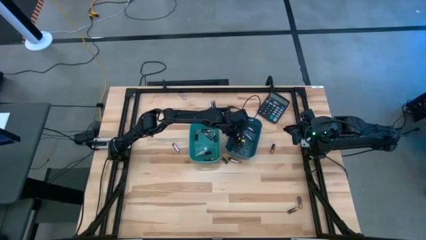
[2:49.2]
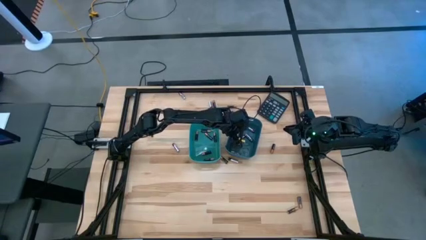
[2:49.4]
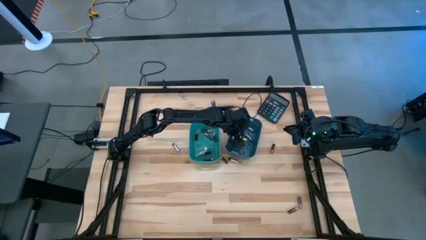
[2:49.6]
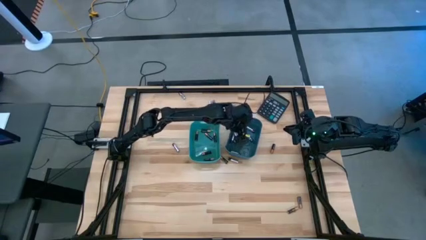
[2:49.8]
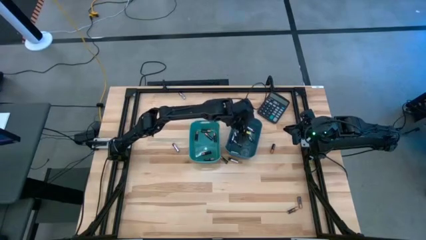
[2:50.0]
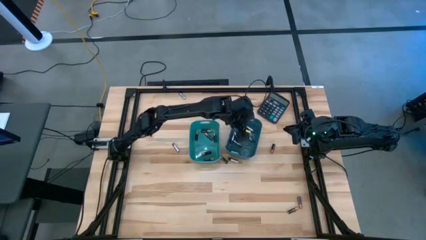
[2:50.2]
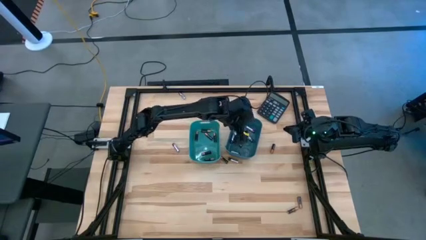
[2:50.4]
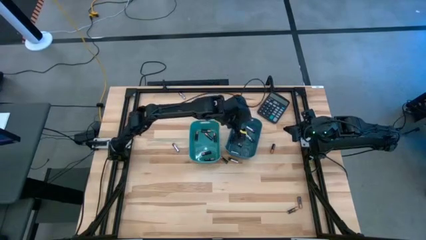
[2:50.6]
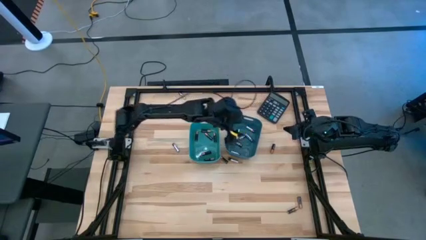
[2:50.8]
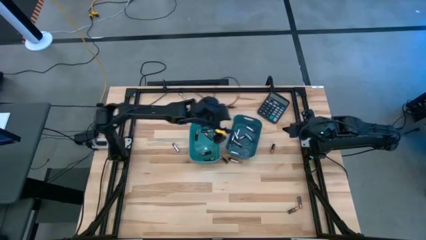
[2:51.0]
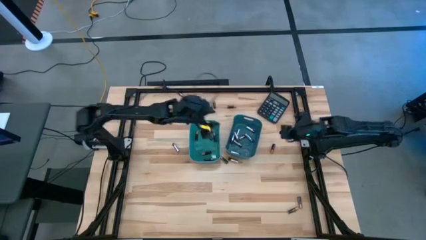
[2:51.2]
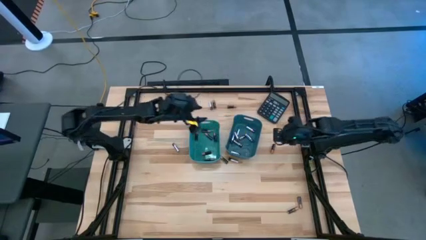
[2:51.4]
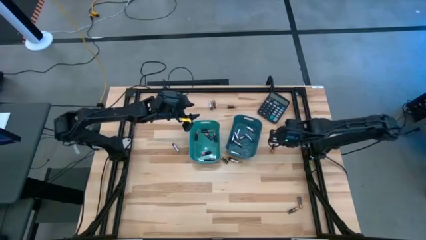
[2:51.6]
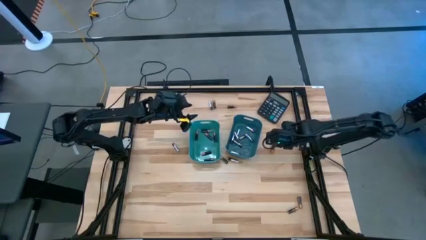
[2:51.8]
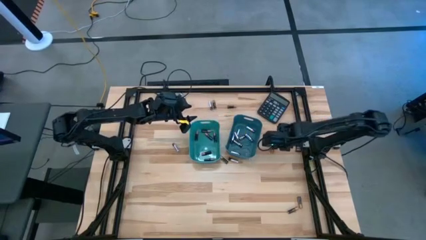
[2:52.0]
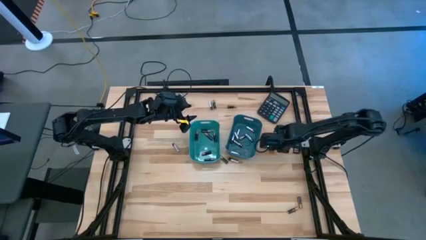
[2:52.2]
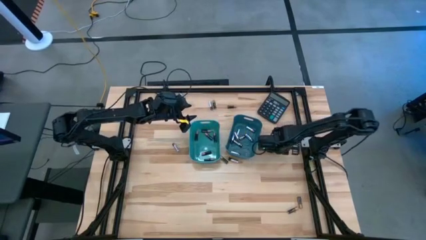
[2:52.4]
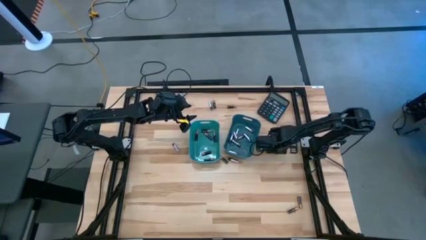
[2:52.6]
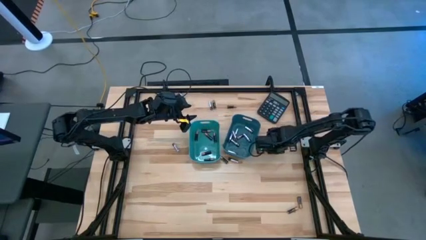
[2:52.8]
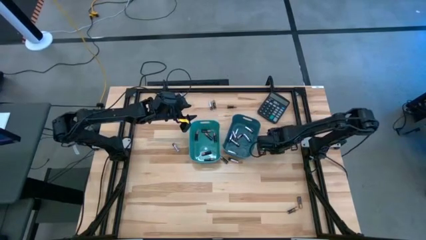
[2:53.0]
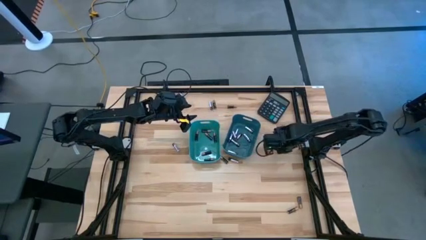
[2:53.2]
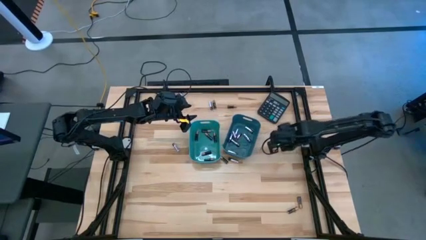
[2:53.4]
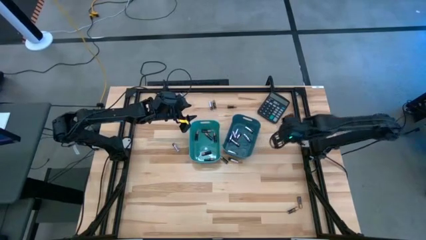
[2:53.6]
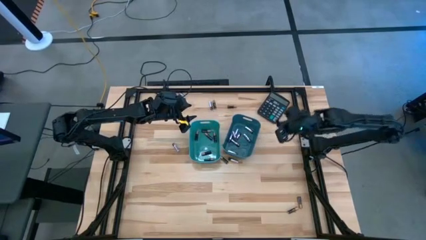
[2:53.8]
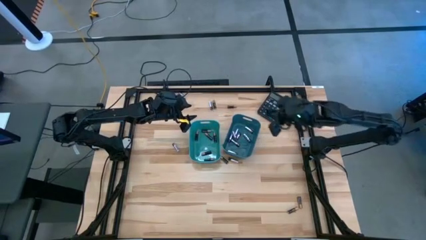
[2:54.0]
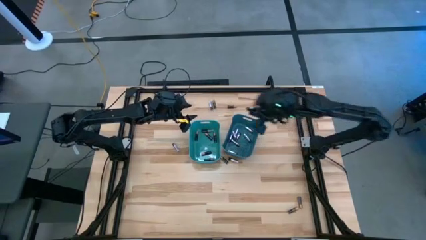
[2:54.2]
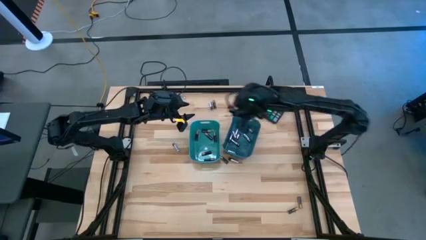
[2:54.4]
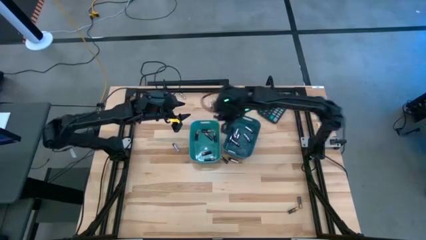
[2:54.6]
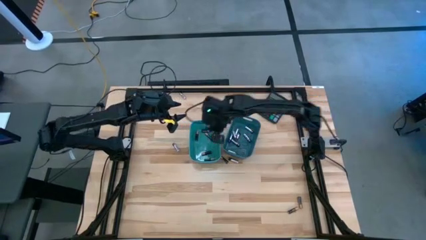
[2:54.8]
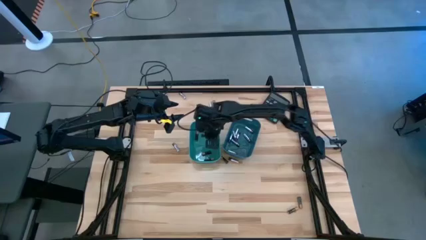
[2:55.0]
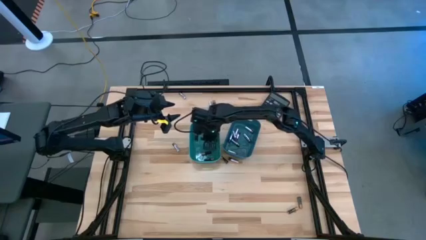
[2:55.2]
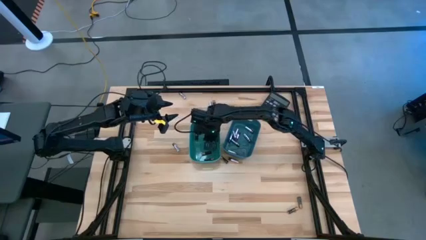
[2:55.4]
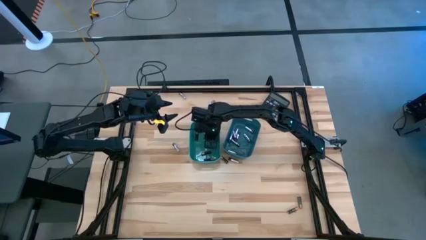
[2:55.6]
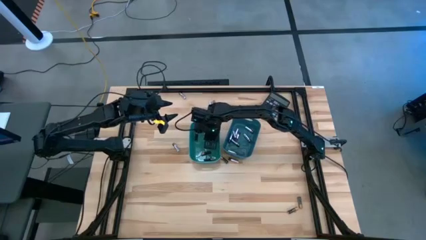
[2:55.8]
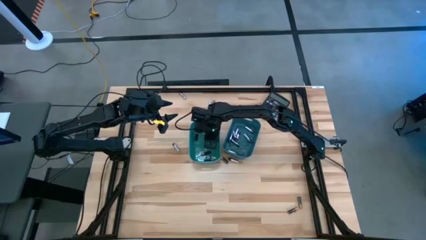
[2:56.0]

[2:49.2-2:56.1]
Task: Sort batteries
Put the black battery into the green bin

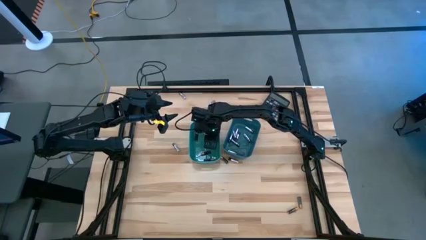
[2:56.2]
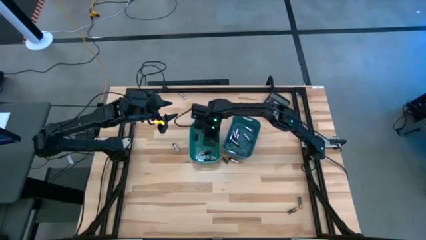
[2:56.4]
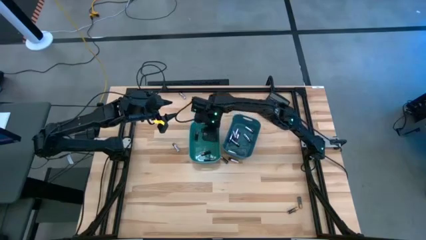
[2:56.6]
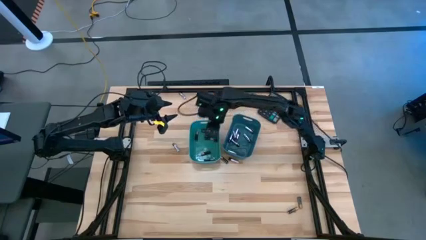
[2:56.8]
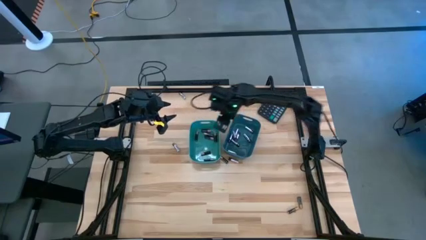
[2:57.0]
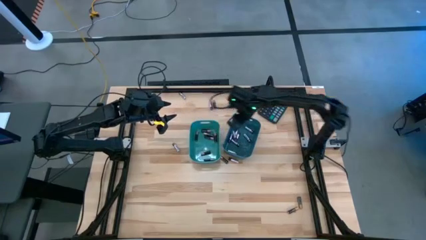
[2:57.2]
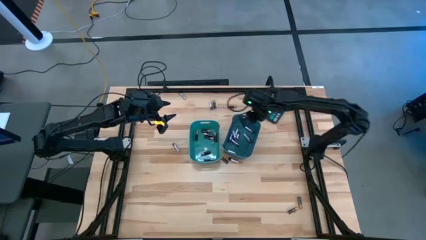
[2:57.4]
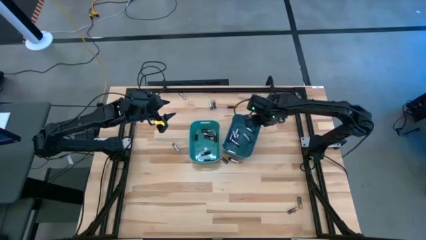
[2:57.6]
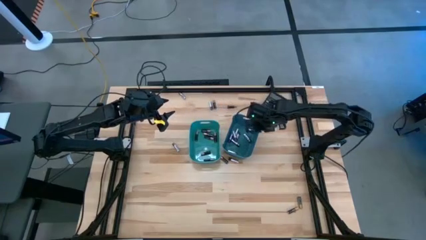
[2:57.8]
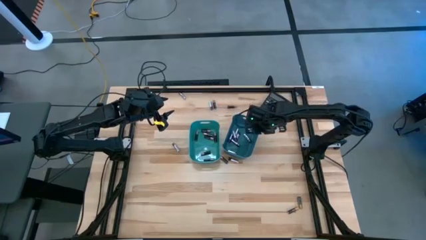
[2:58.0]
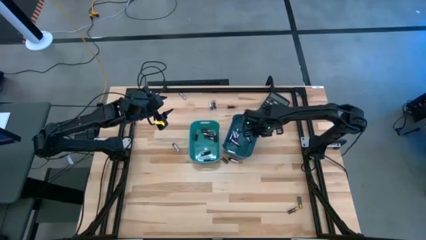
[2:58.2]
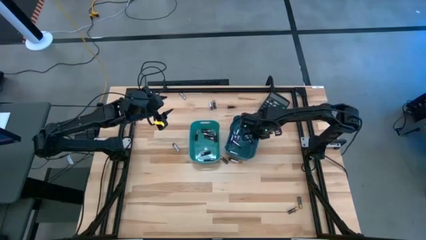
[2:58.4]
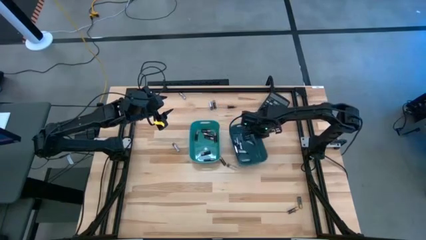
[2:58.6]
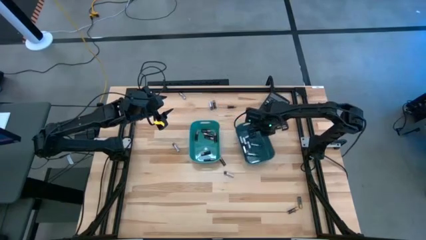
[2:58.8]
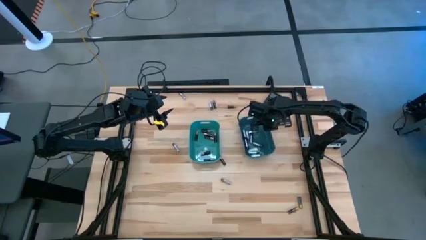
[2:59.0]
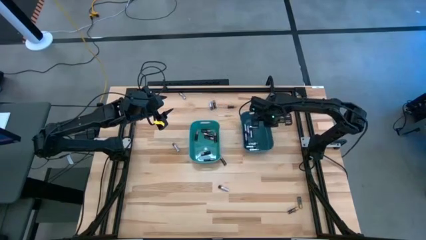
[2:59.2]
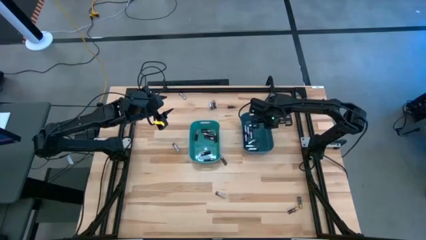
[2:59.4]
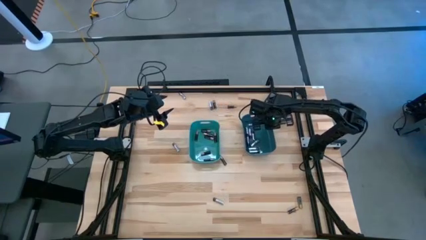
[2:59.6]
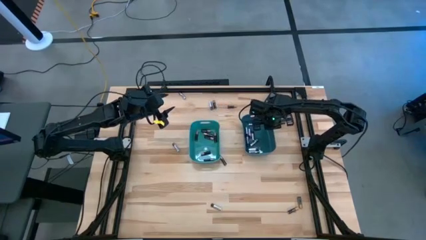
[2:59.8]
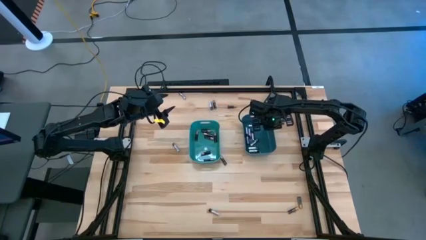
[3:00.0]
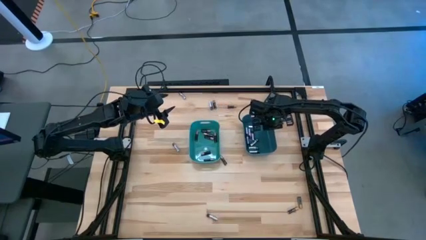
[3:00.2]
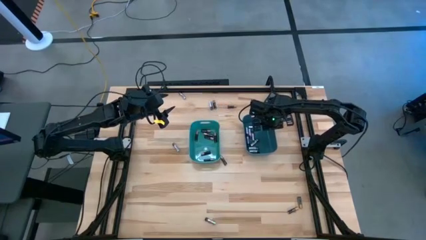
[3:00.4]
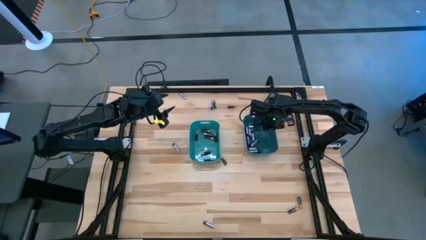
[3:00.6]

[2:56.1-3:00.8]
Adjust the blue bin on the table

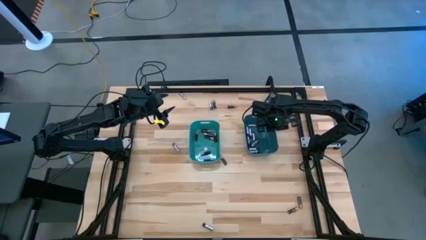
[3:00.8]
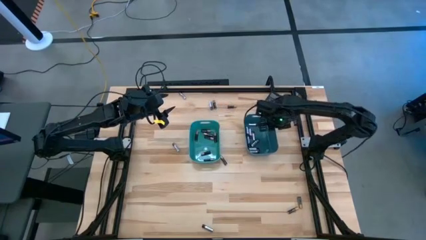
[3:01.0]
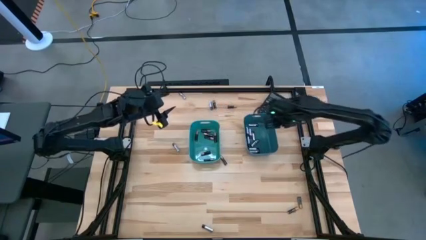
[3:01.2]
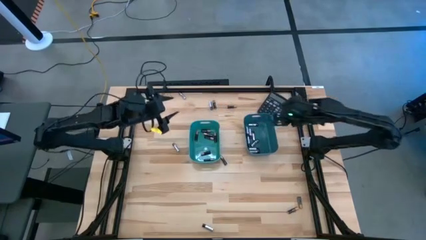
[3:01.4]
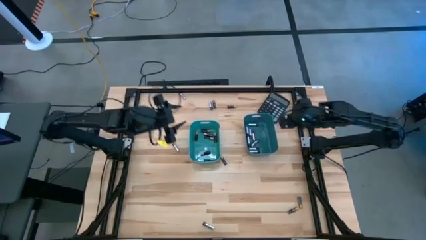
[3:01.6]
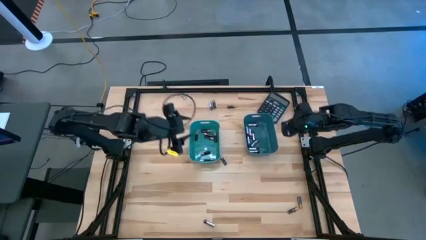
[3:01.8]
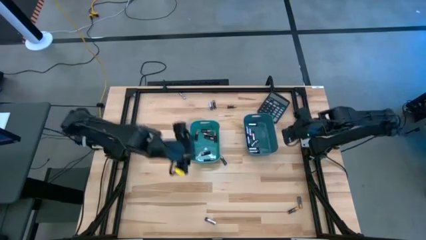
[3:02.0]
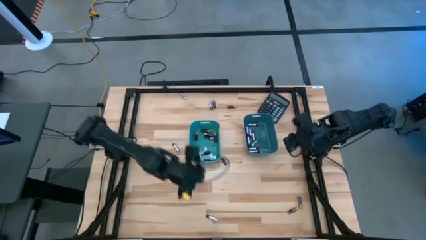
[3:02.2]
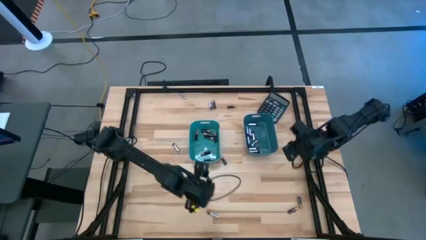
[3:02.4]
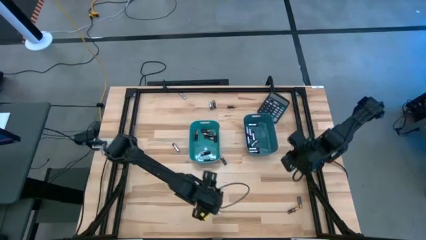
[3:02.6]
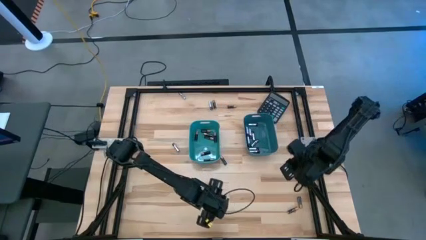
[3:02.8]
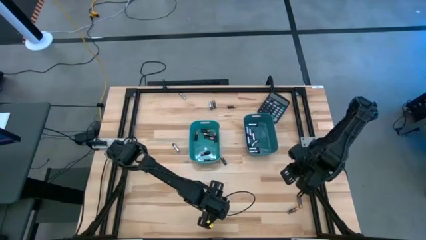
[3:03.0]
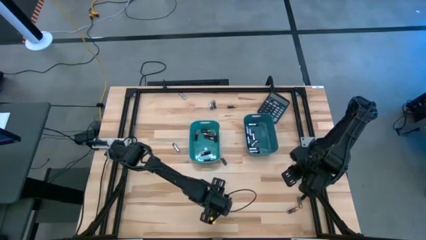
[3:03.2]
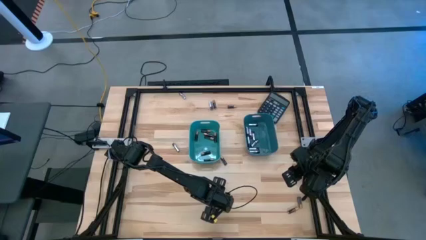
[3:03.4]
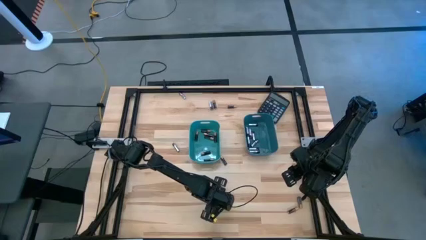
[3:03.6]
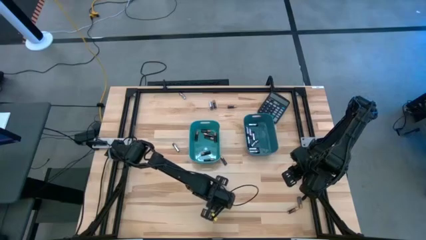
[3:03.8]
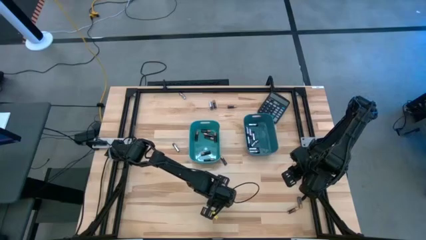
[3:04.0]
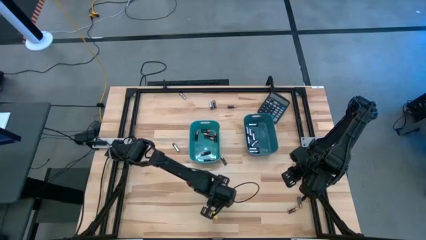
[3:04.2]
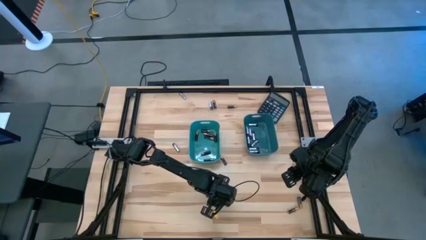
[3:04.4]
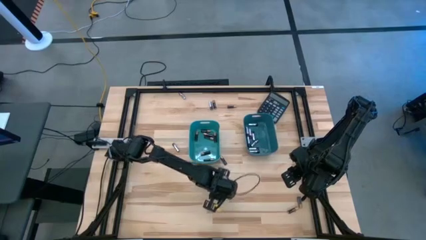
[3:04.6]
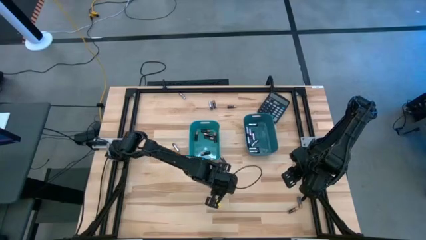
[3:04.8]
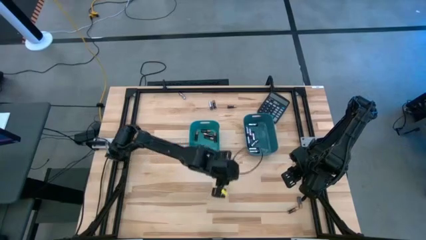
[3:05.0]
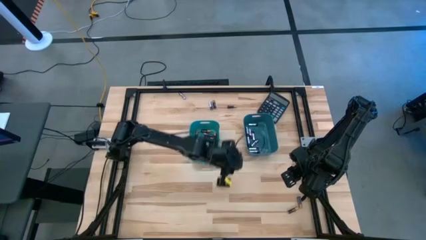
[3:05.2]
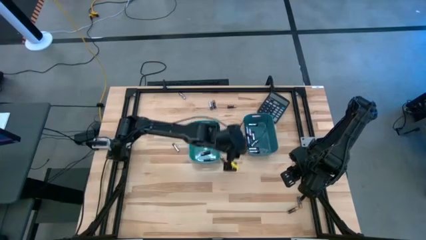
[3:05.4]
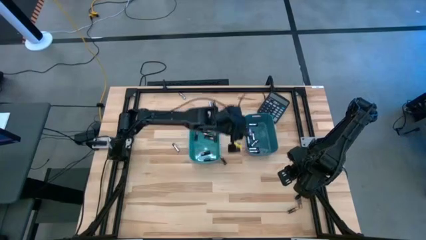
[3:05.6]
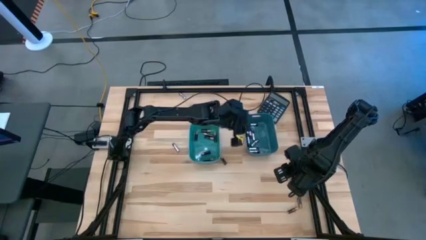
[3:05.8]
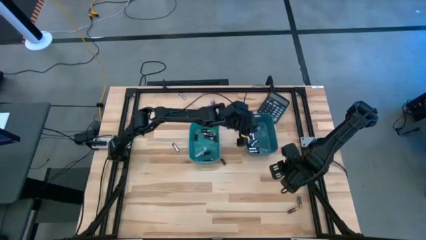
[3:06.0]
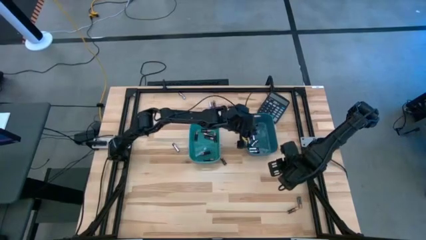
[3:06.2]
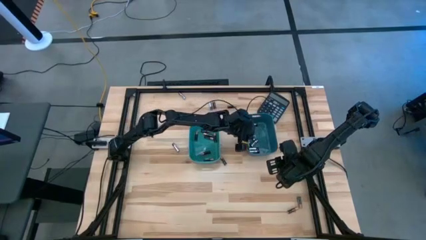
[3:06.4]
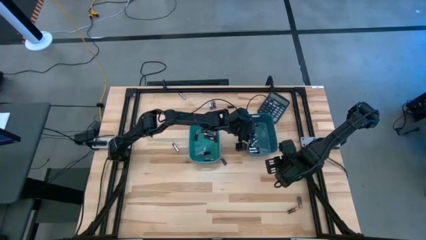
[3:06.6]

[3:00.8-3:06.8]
Put the silver battery into the blue bin
